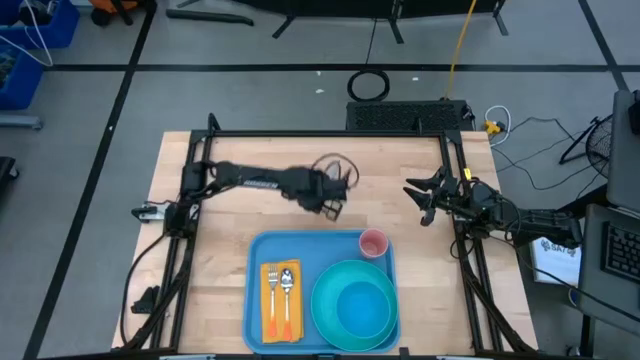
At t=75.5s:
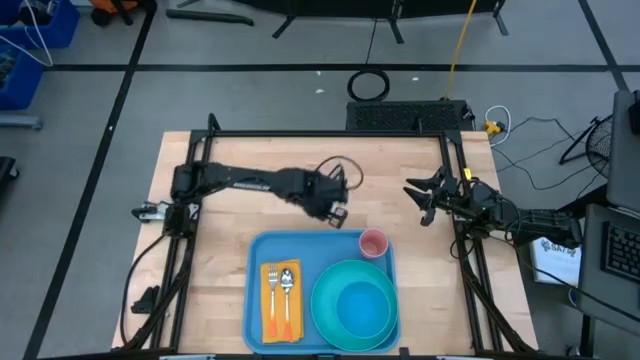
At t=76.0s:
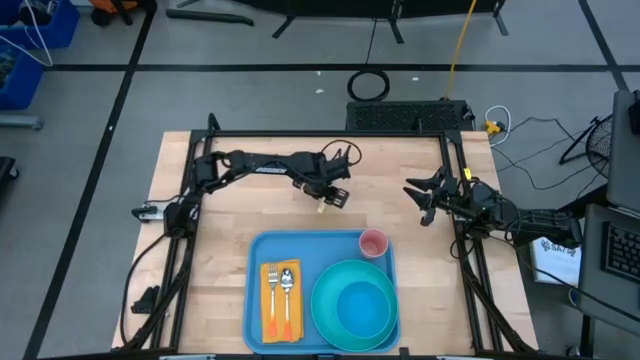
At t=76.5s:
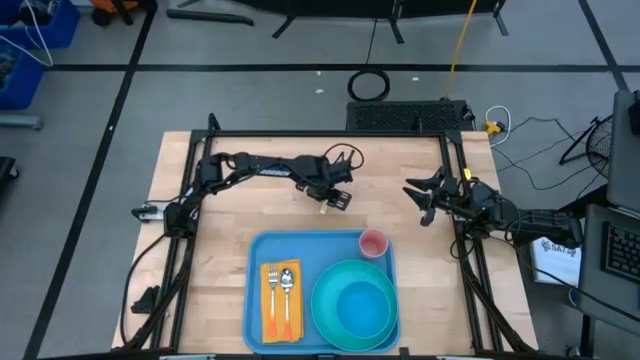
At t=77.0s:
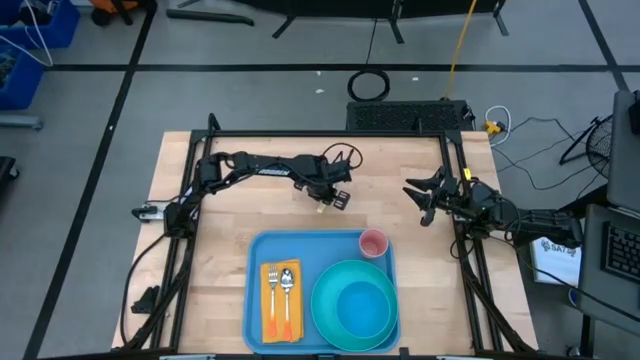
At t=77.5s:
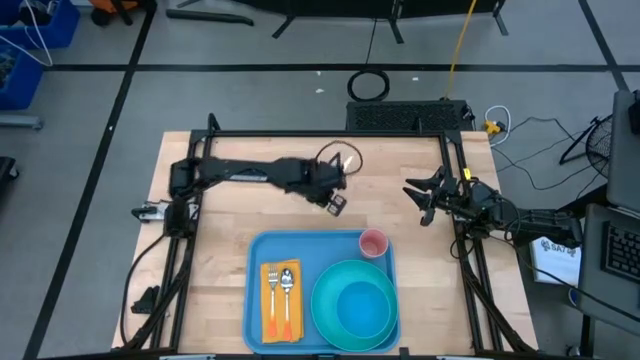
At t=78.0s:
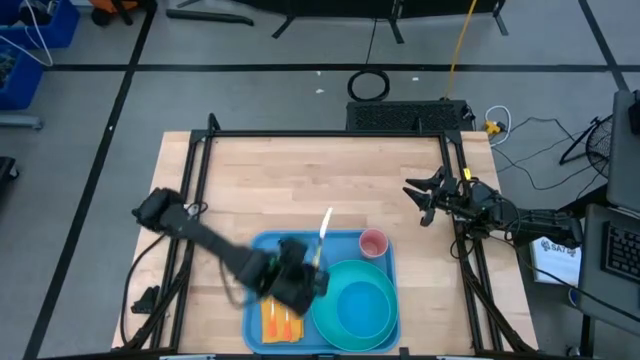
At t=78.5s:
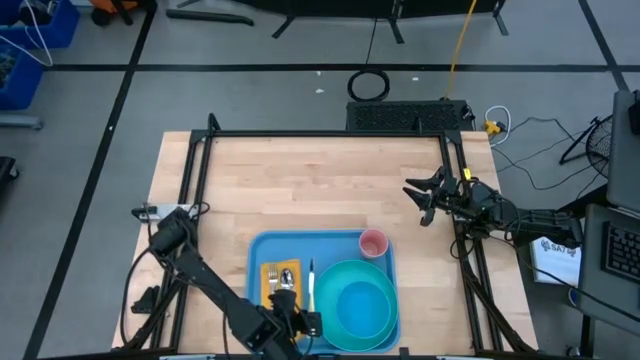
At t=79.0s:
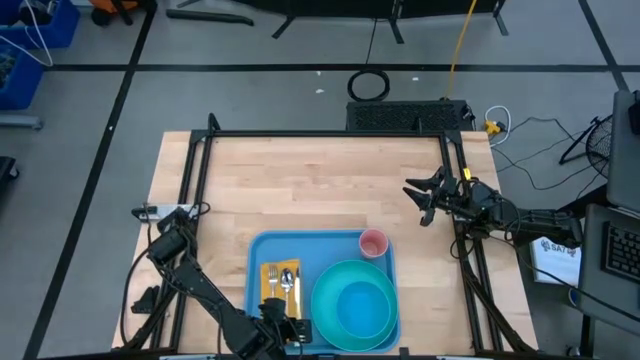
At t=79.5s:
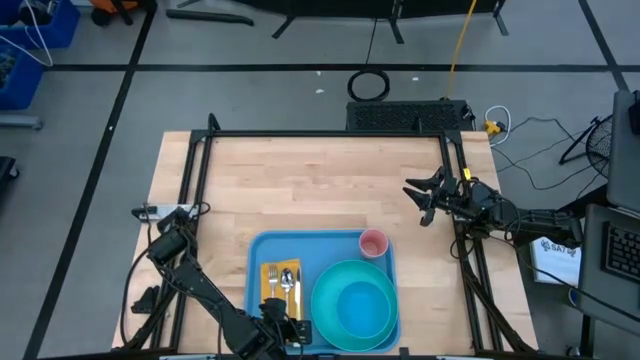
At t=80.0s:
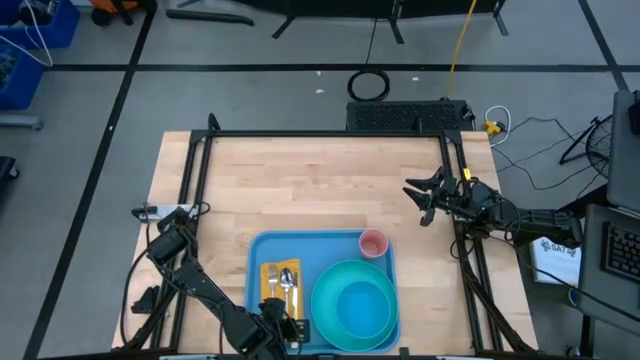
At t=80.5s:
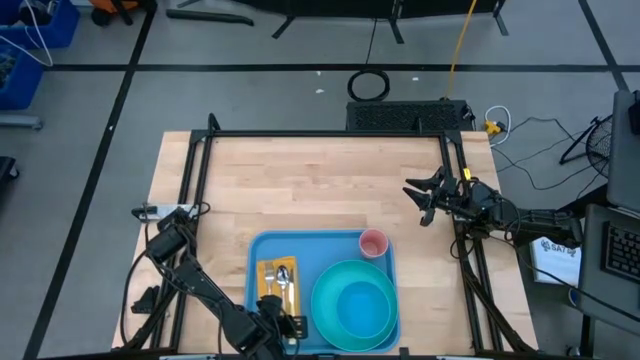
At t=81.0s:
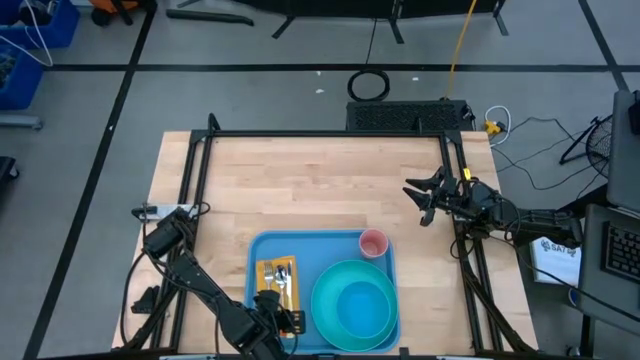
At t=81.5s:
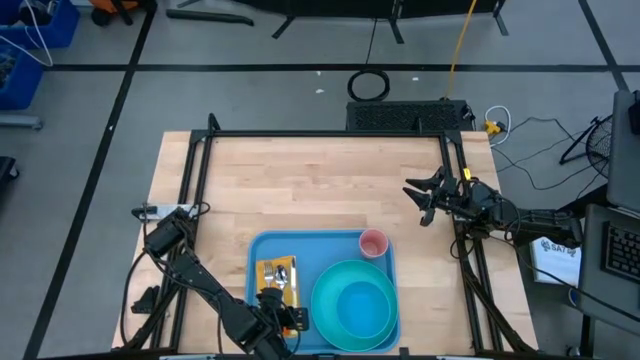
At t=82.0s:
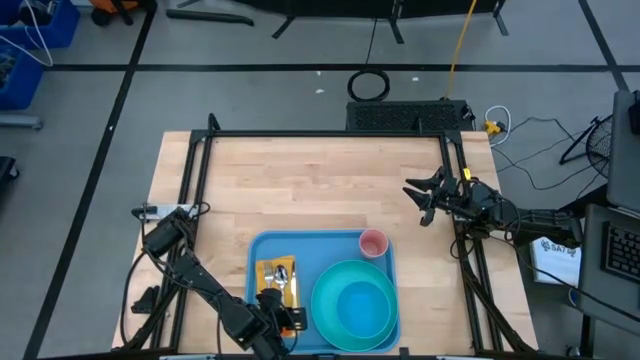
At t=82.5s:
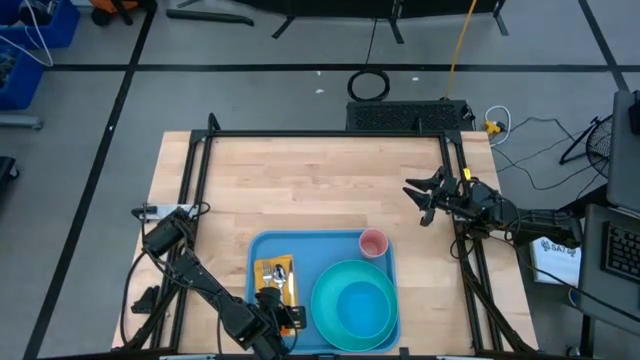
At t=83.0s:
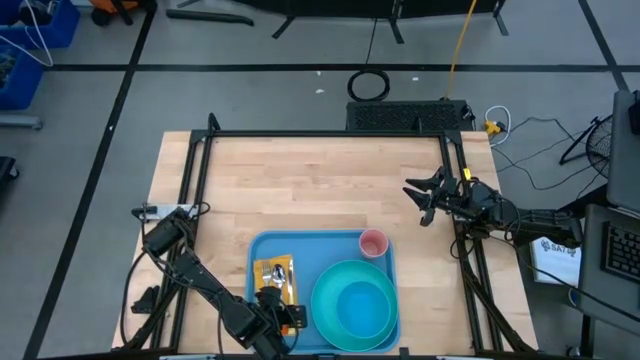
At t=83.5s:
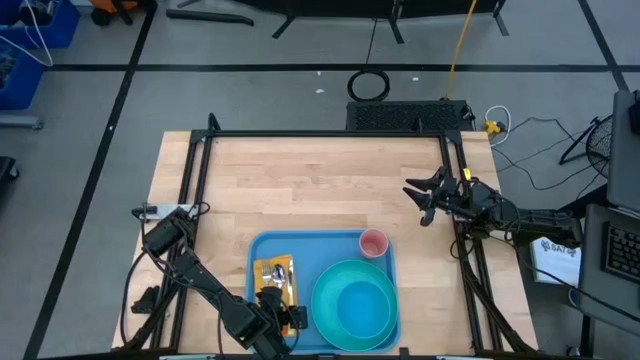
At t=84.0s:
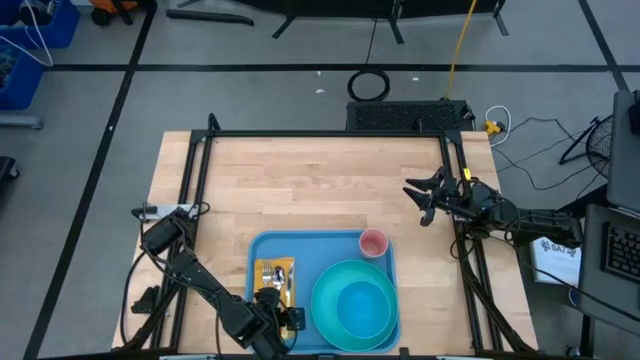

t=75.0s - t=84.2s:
Task: Set up tray
Put the table knife on the blue serving tray

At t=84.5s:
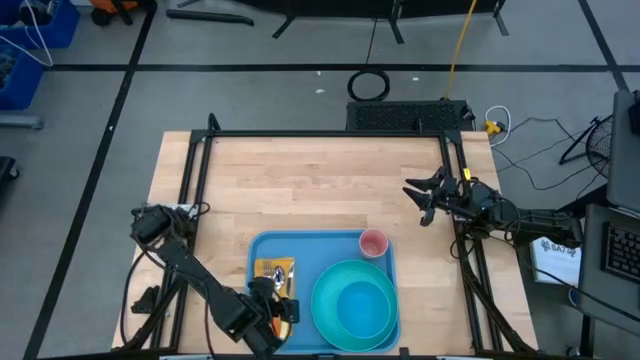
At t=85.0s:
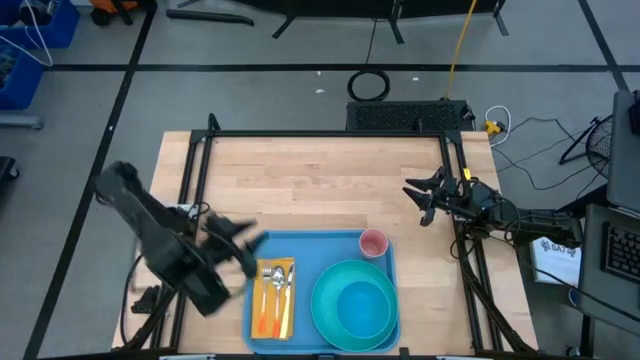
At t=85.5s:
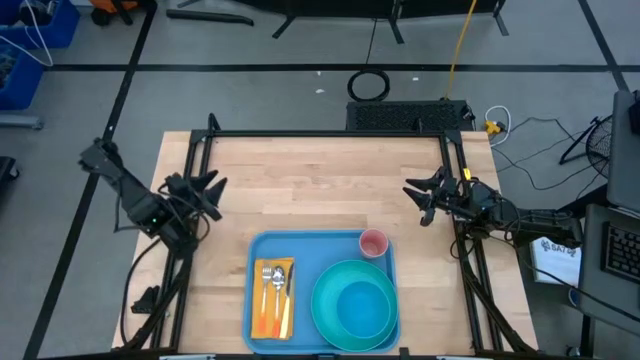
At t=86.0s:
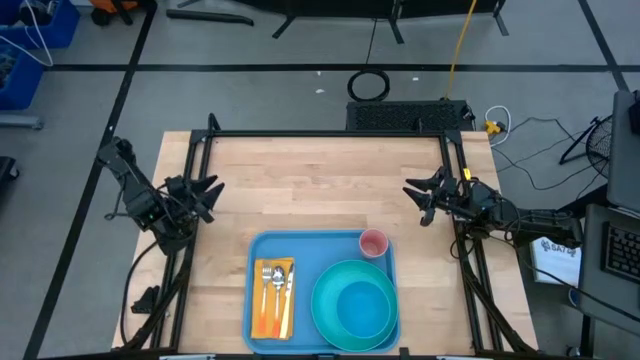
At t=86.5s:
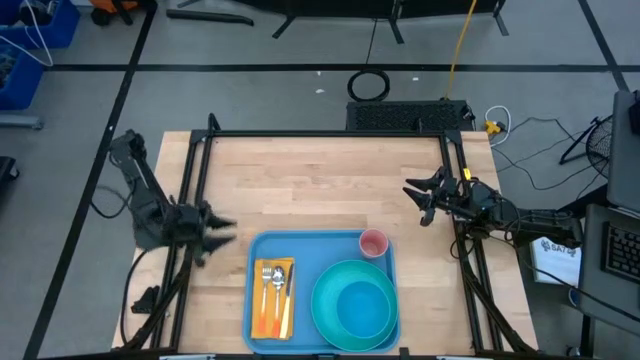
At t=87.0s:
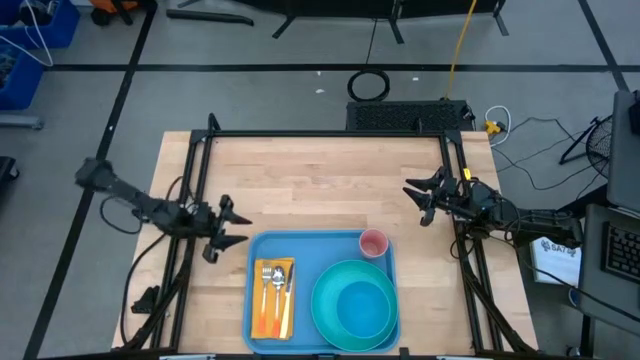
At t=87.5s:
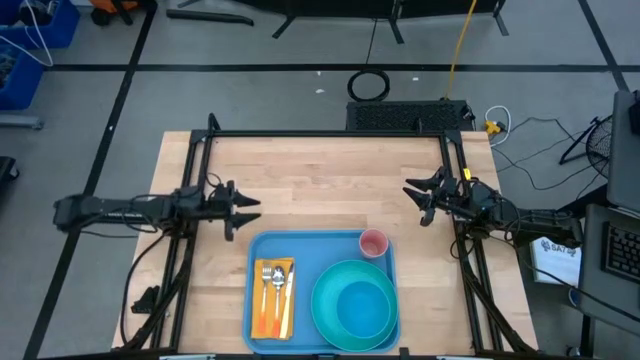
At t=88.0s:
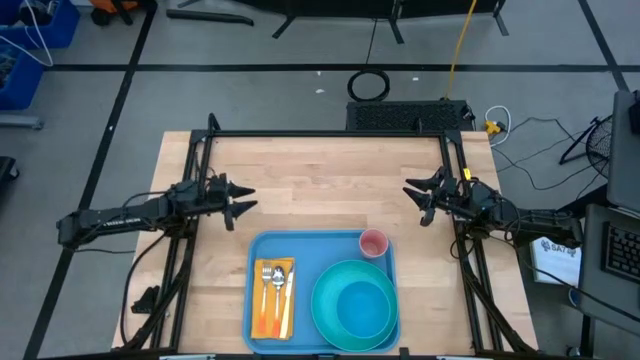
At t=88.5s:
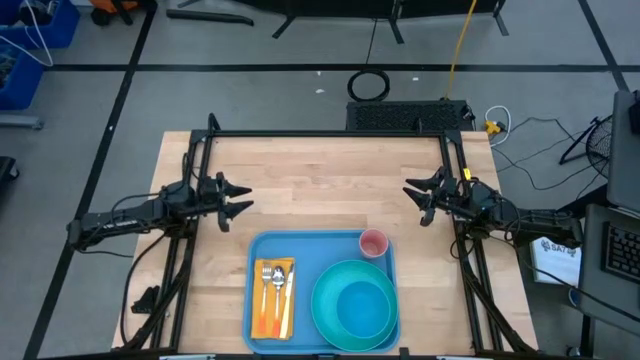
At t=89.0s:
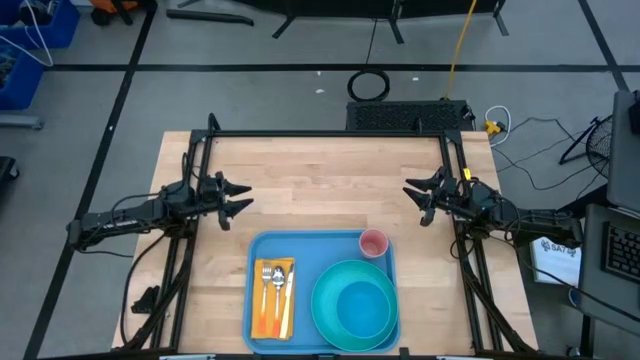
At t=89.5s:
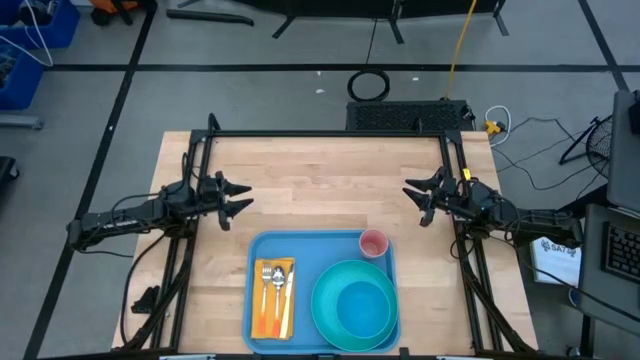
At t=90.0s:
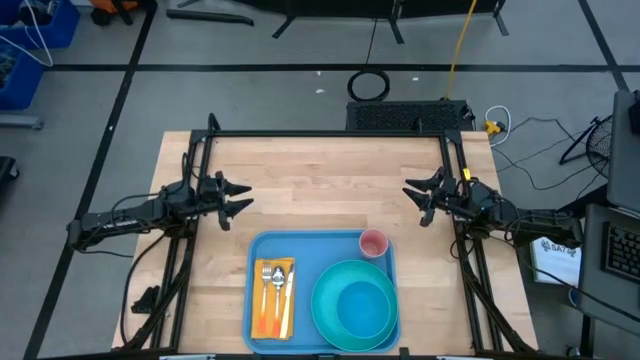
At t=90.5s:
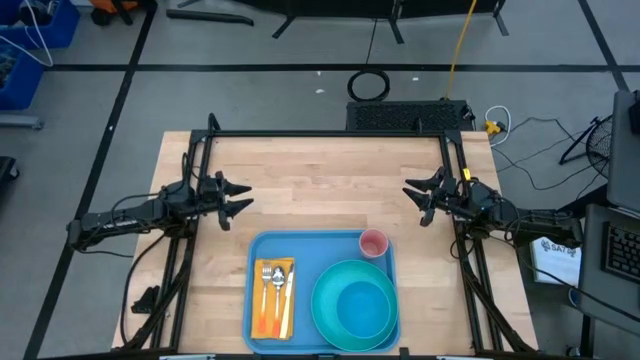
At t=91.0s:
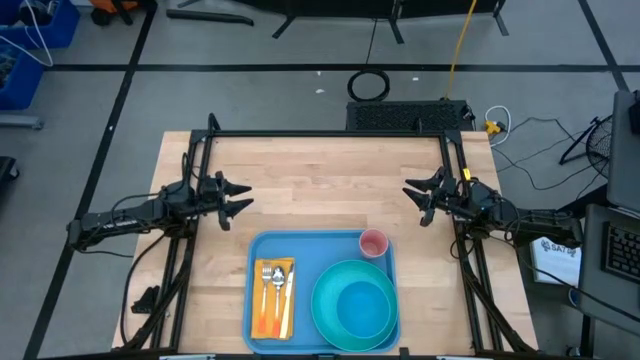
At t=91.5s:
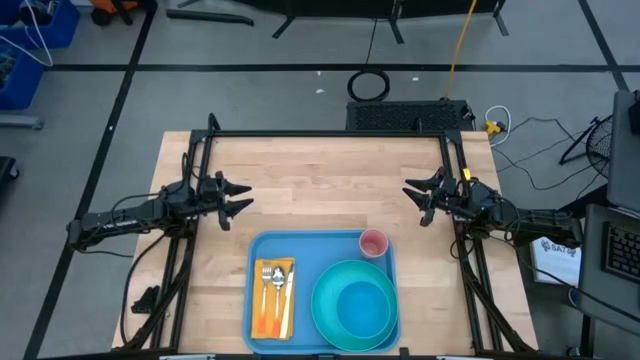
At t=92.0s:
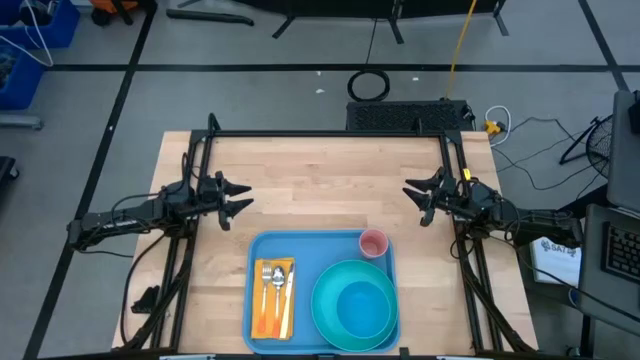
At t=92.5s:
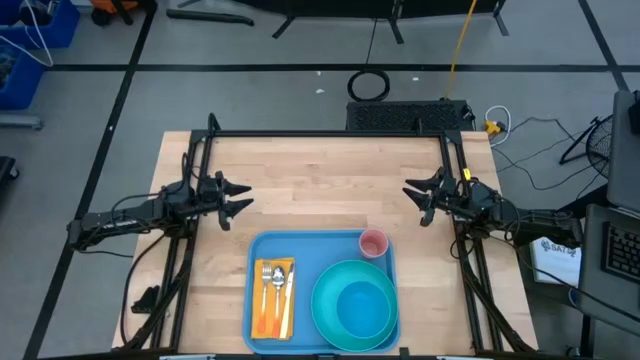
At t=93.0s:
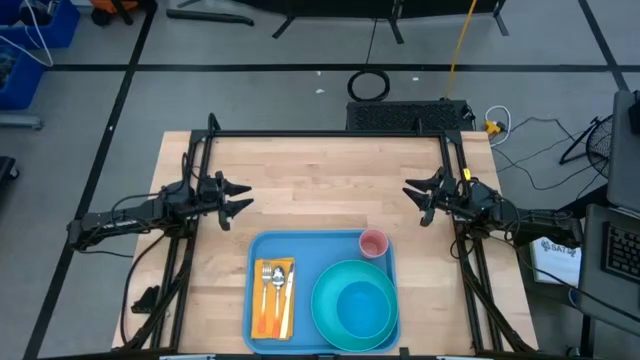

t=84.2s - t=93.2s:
Return to Home Position

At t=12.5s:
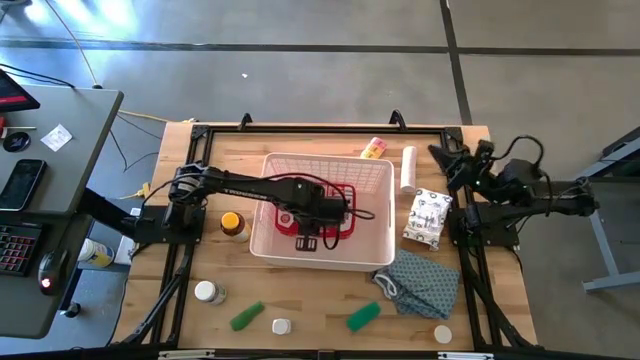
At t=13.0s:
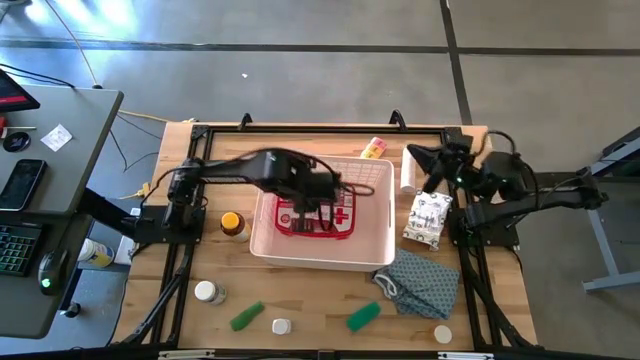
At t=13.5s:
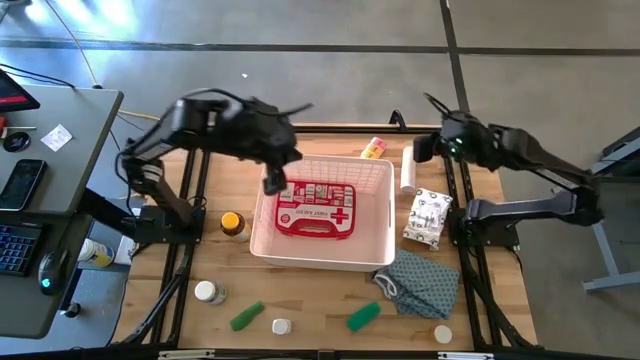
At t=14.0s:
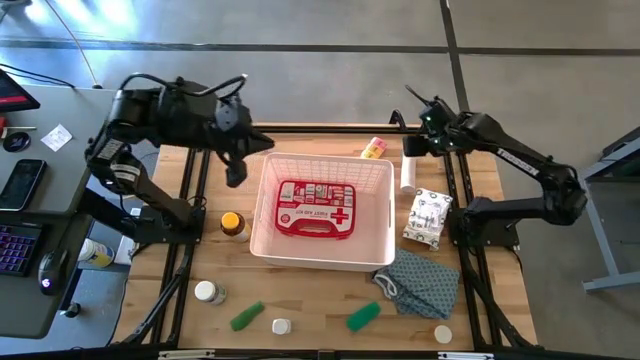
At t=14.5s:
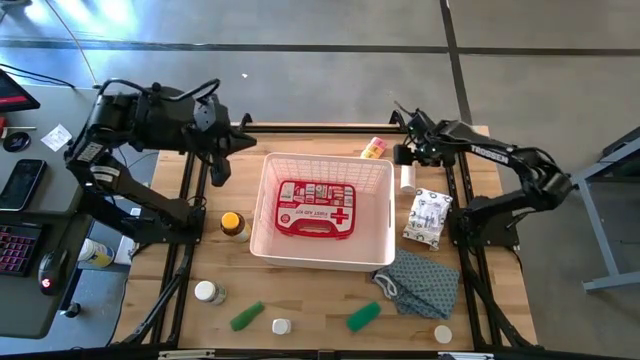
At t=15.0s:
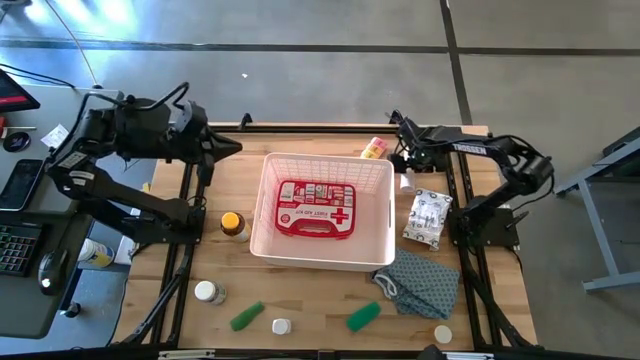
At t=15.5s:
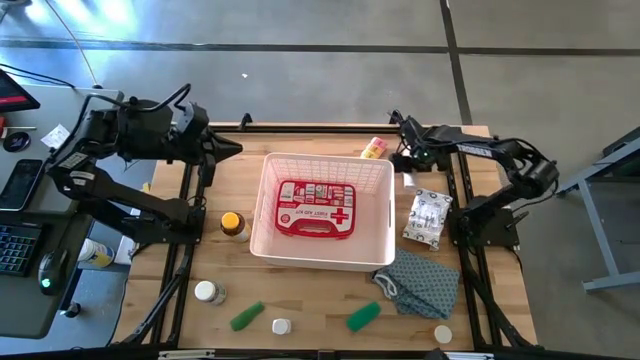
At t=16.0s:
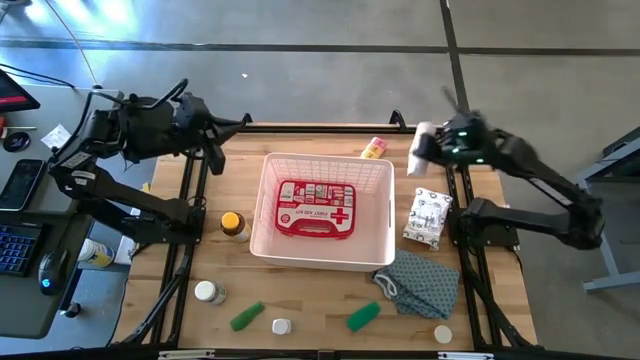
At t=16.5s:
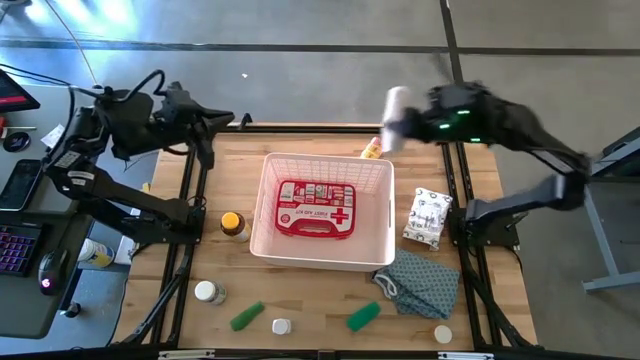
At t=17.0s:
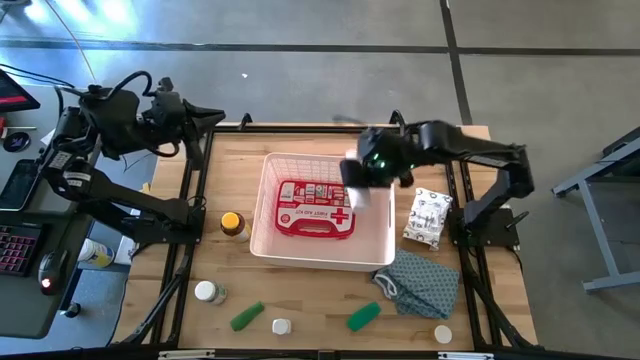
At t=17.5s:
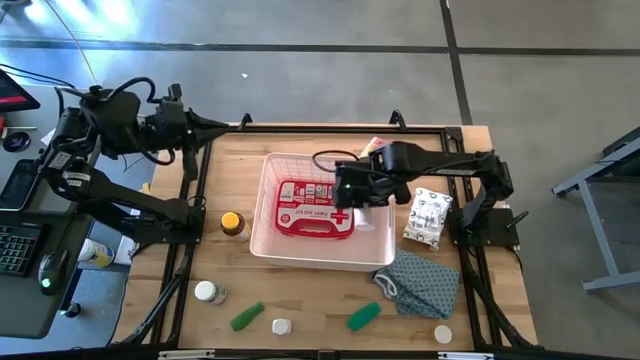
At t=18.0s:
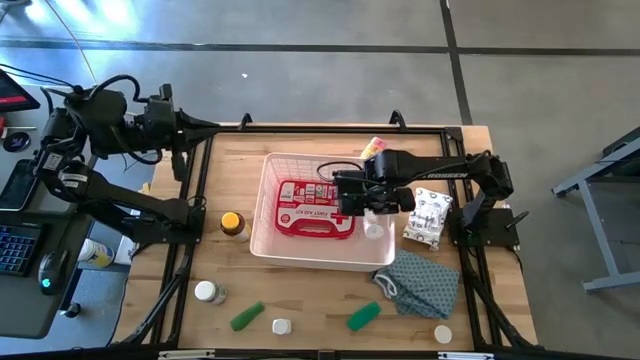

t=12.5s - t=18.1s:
Task: Pick & place medical supplies in basket/bin
Put the rolled white bandage into the white container
